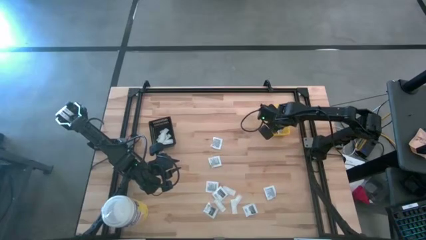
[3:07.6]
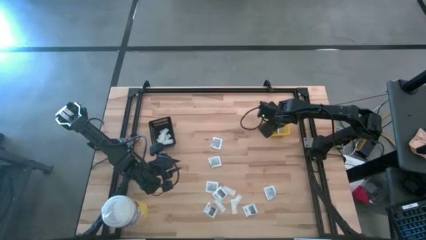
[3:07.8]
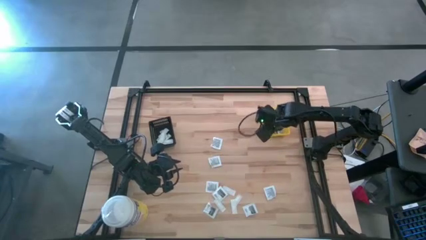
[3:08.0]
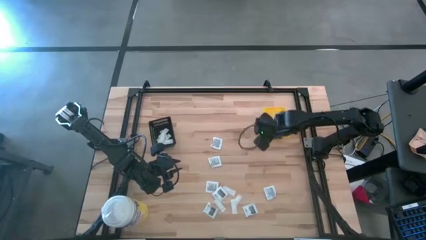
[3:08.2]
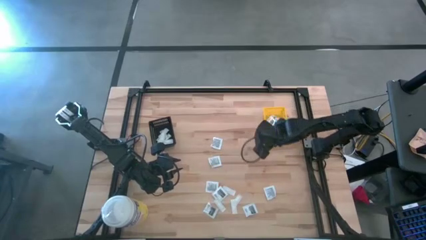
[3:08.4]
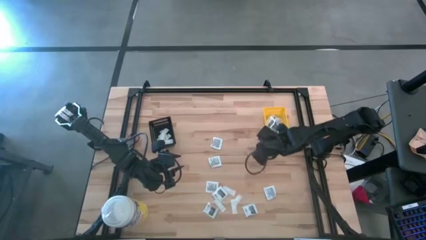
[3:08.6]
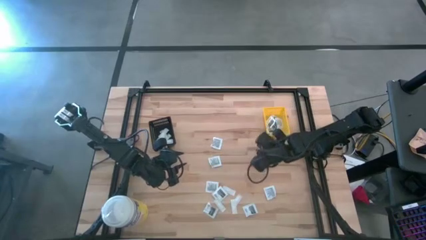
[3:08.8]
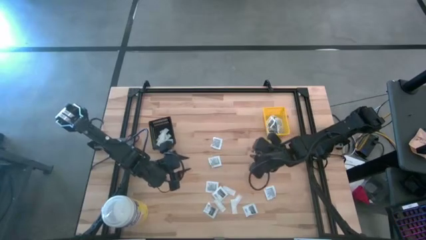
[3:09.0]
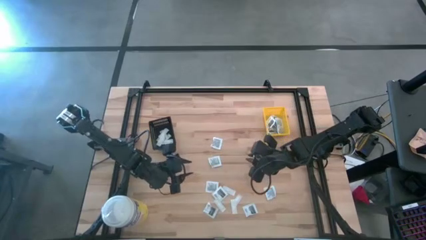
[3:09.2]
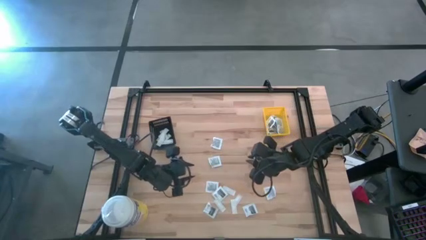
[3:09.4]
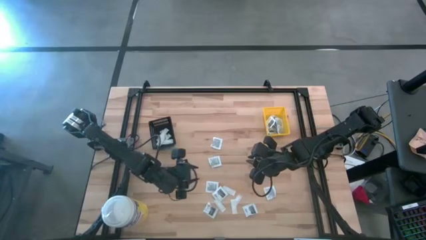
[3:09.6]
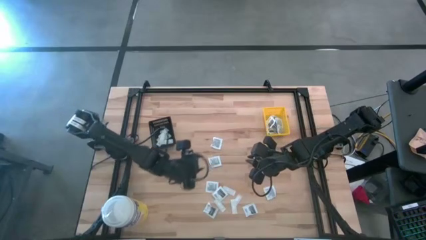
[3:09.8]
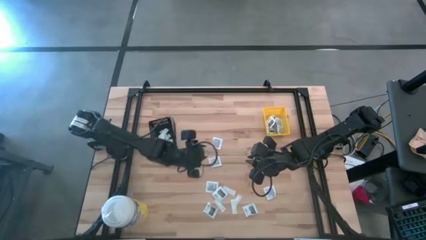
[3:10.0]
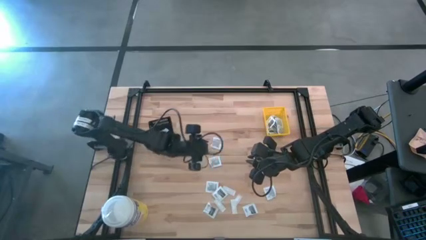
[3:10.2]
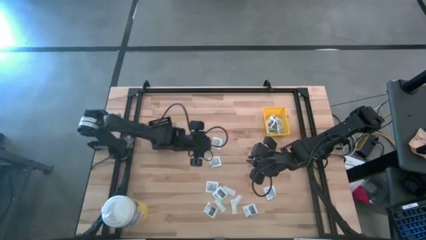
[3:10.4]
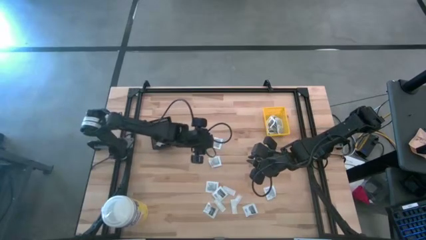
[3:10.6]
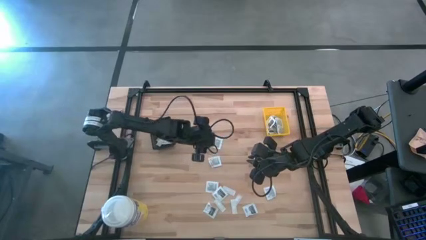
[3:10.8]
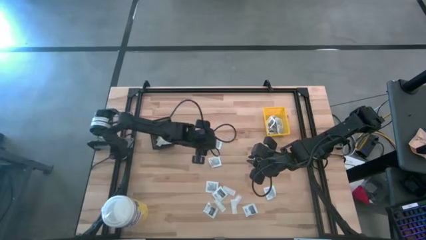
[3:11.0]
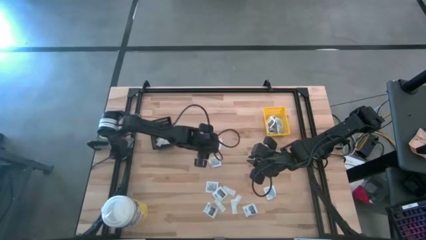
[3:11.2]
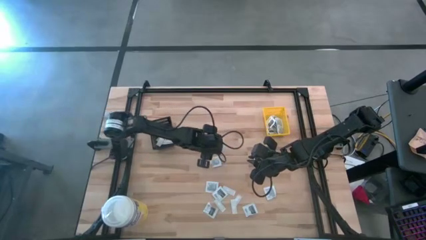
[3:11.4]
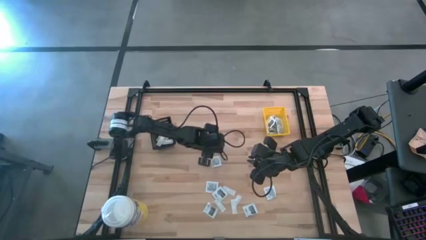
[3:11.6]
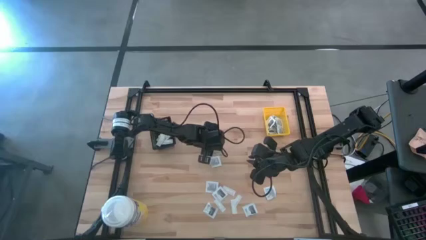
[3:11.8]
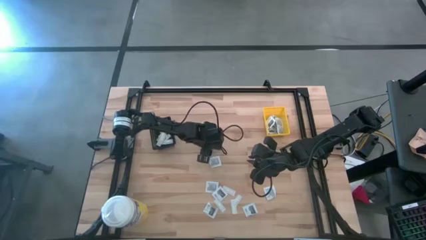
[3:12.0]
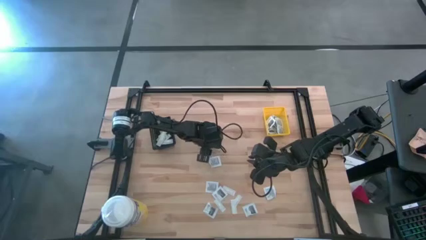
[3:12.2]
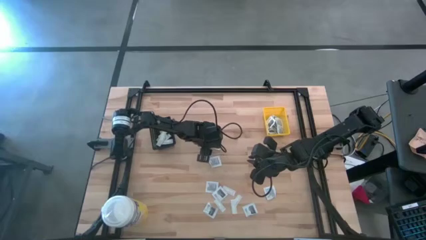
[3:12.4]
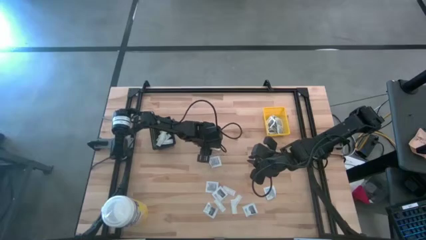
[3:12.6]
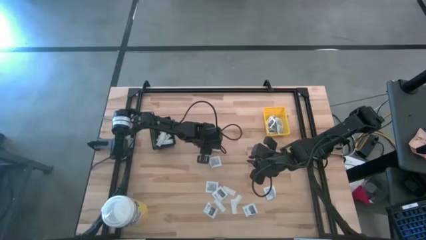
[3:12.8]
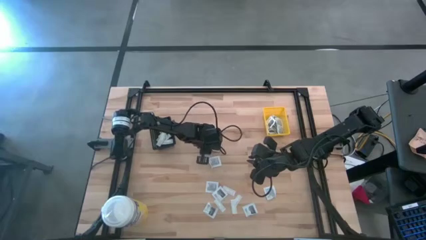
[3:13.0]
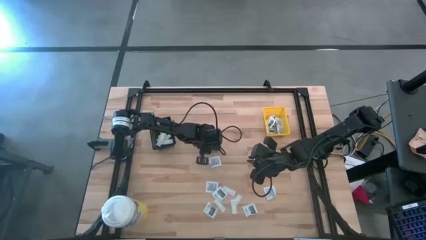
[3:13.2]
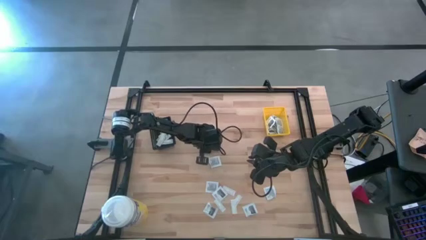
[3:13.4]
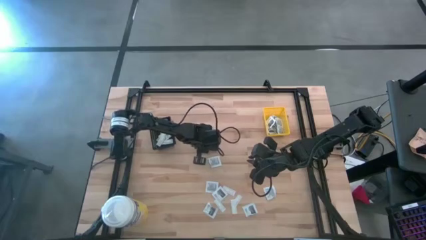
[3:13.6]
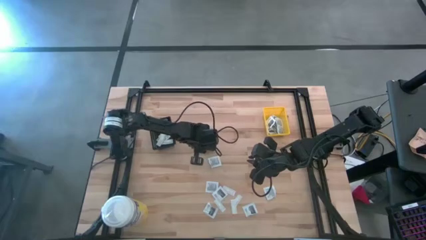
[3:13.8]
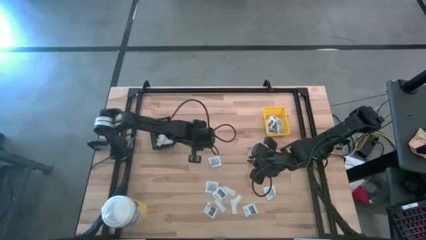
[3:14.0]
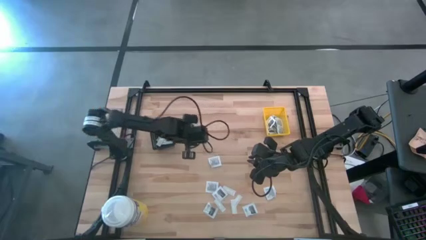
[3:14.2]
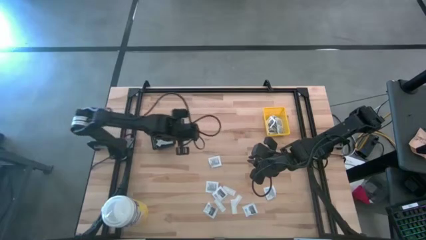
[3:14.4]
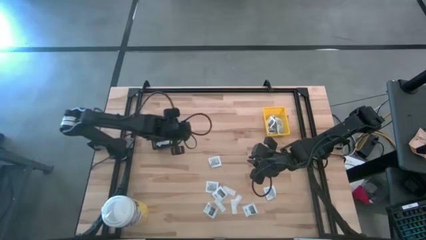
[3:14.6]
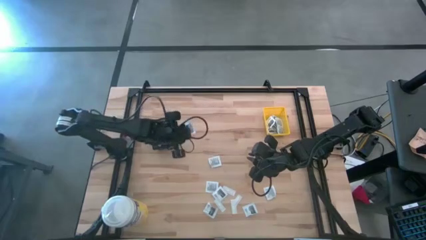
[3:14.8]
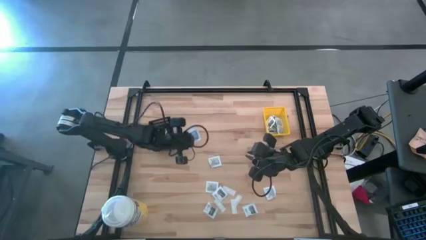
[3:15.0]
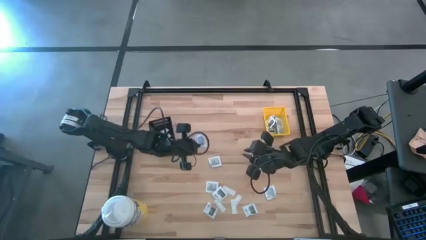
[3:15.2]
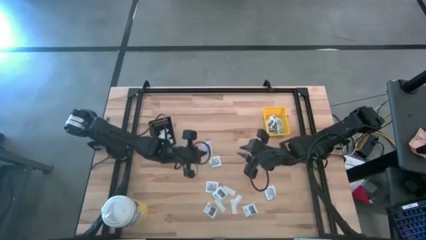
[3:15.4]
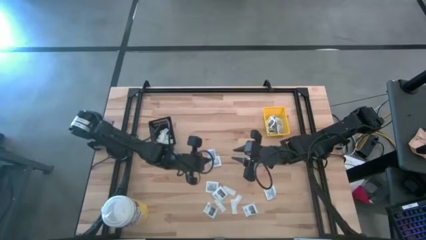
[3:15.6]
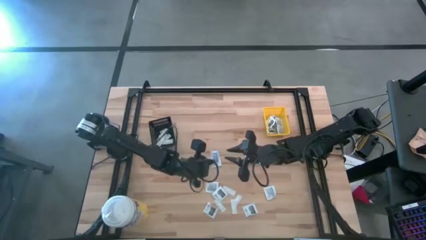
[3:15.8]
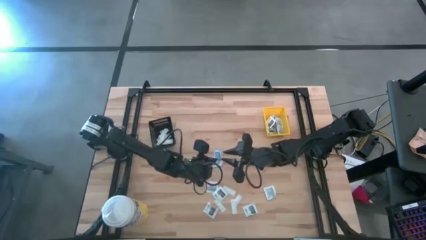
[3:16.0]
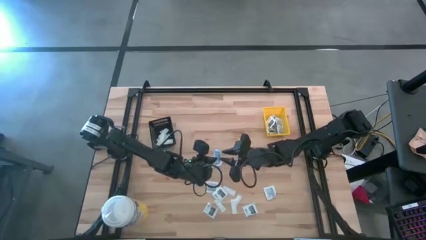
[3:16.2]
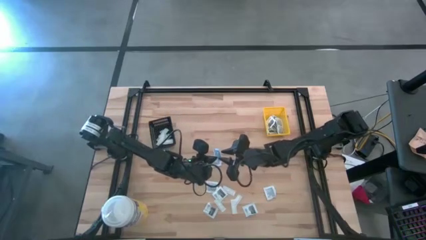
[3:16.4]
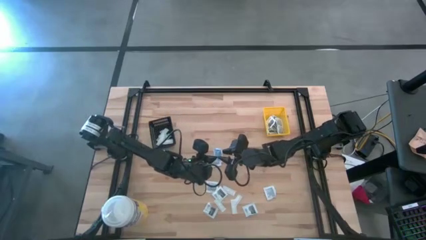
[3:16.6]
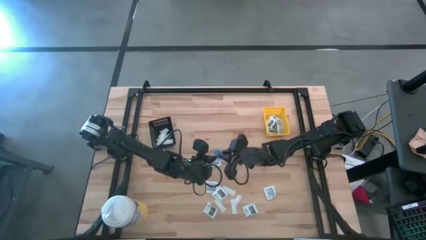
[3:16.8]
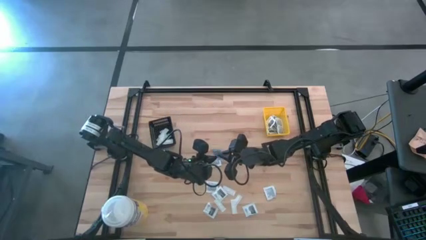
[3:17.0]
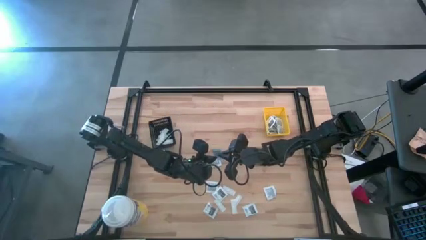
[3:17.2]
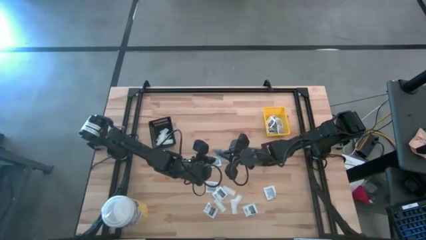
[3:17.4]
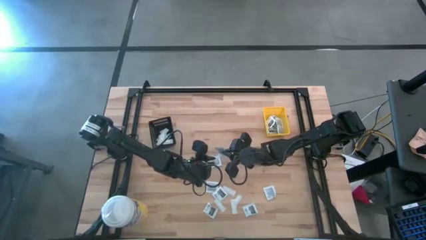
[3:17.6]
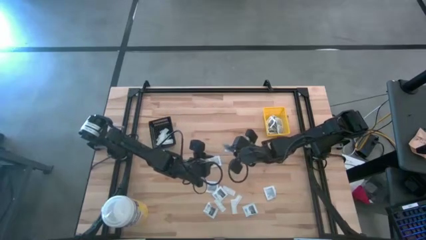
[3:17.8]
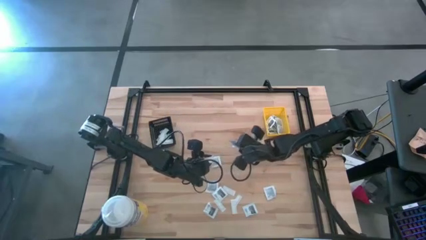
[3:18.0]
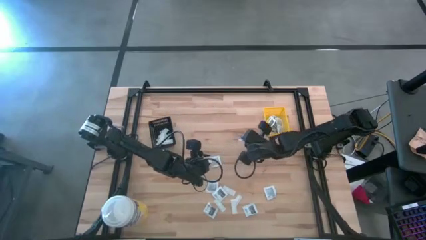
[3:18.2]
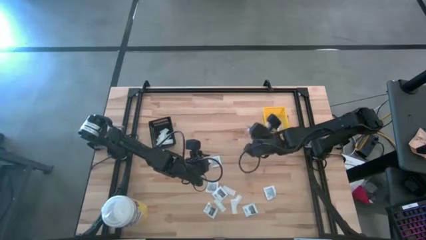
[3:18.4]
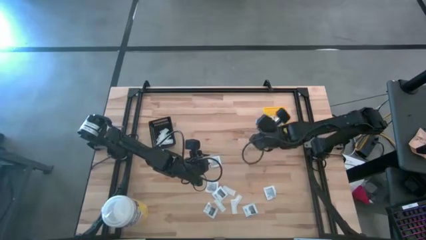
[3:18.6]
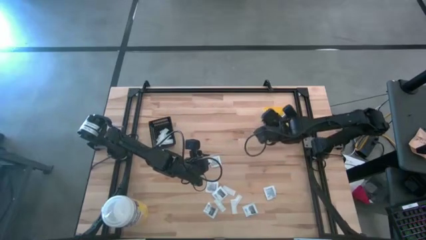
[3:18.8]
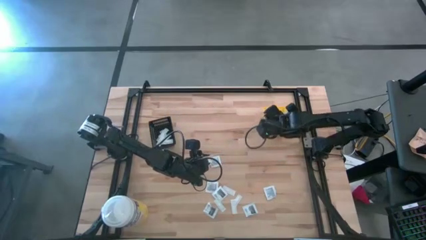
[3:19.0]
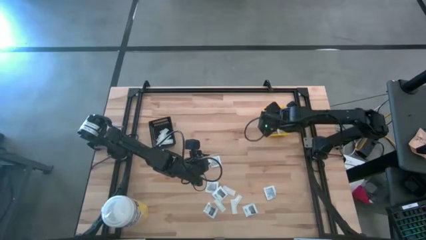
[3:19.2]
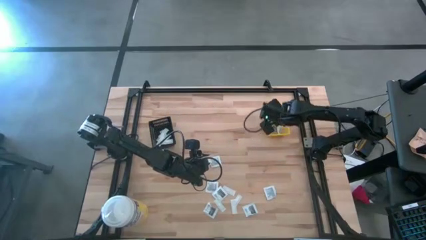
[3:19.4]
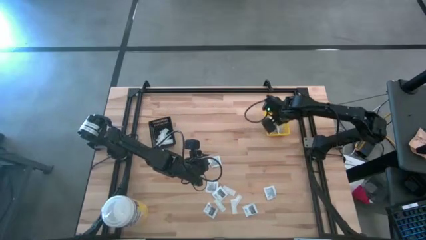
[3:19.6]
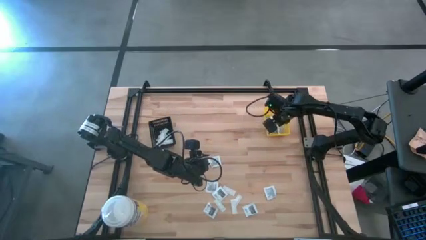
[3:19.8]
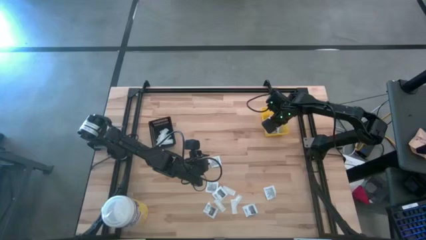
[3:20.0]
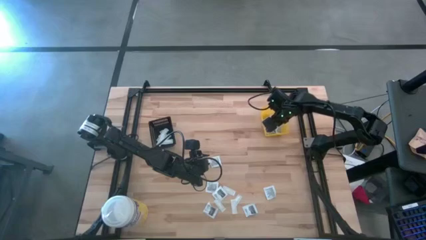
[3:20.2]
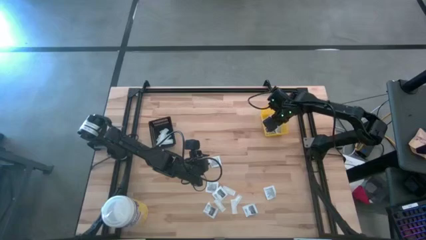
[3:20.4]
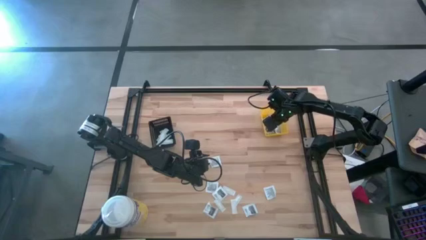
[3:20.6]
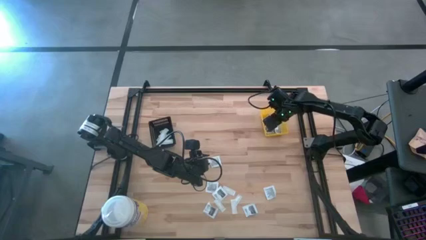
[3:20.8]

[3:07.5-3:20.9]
Task: Pick & Place First Aid Supplies
Put the black pad into the yellow bin
